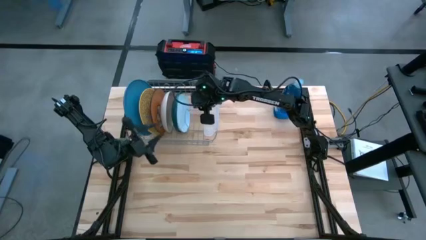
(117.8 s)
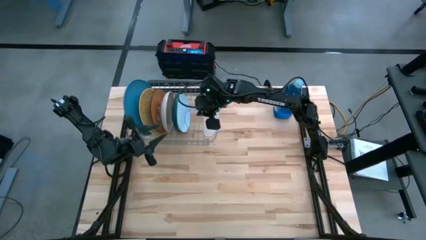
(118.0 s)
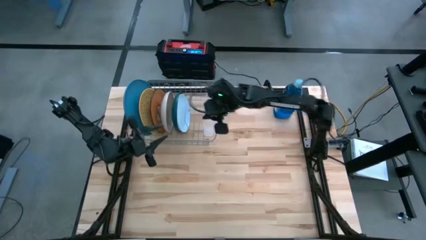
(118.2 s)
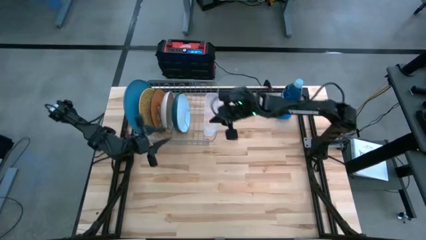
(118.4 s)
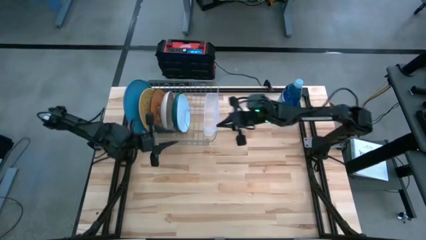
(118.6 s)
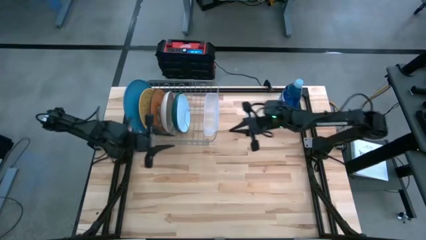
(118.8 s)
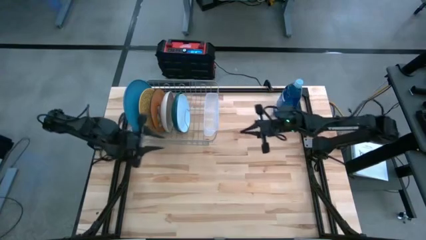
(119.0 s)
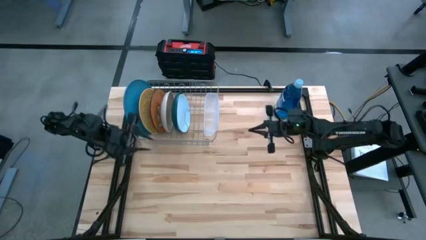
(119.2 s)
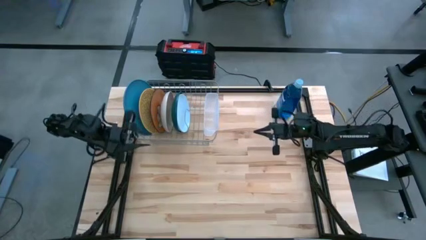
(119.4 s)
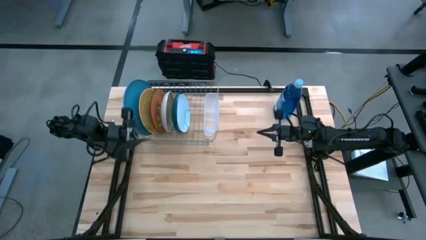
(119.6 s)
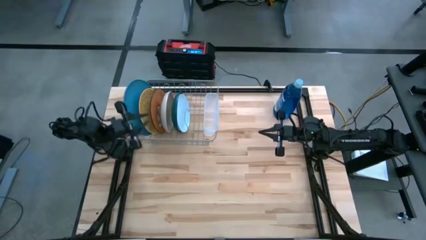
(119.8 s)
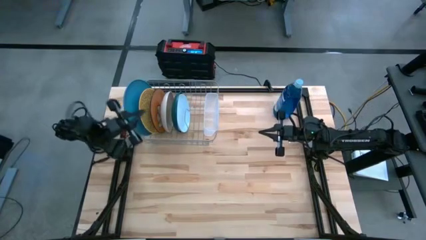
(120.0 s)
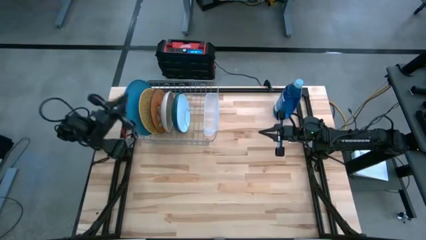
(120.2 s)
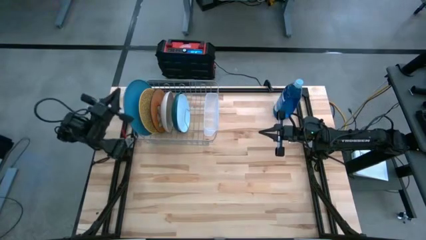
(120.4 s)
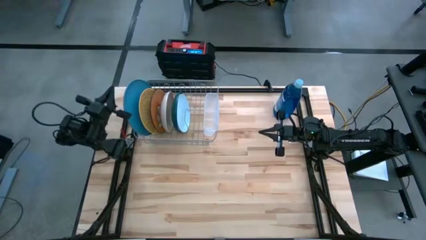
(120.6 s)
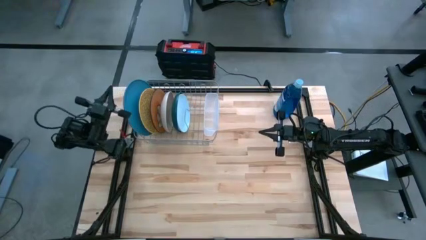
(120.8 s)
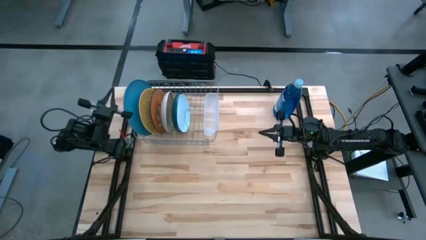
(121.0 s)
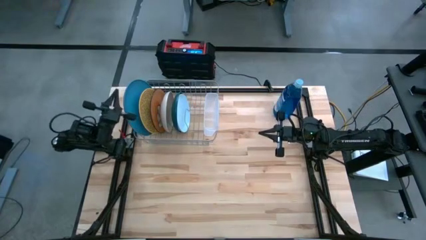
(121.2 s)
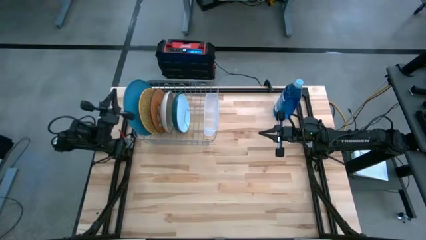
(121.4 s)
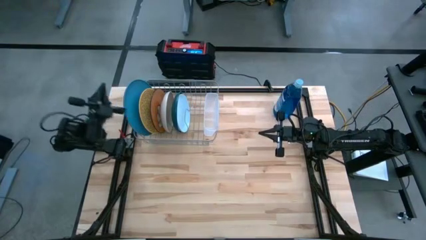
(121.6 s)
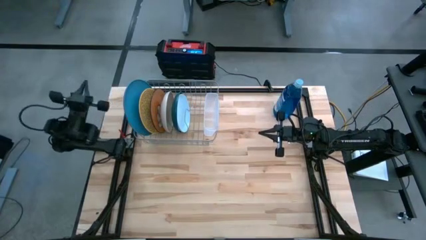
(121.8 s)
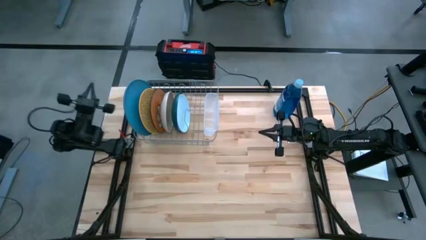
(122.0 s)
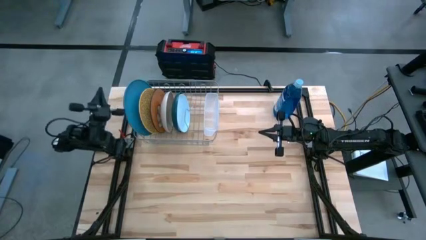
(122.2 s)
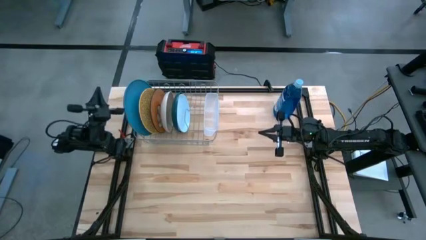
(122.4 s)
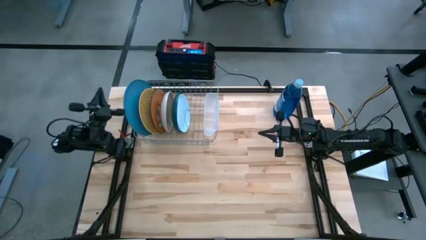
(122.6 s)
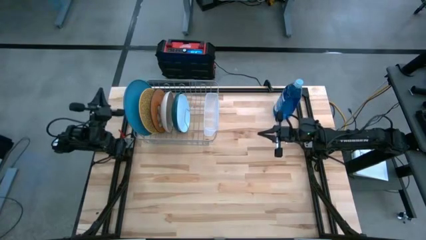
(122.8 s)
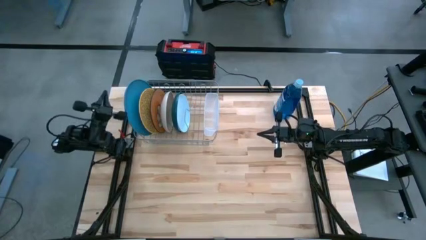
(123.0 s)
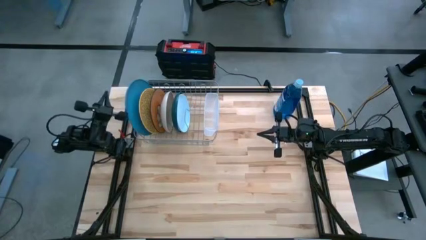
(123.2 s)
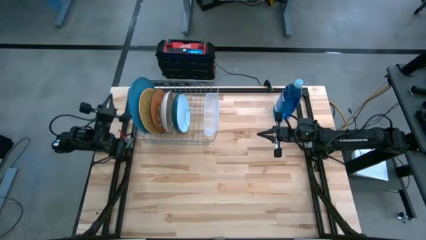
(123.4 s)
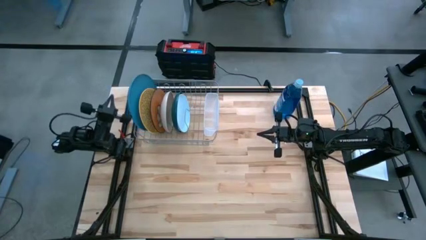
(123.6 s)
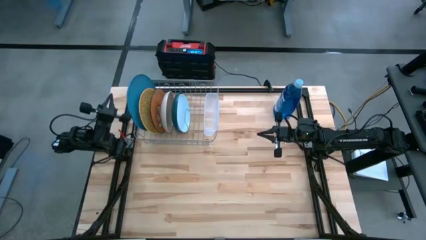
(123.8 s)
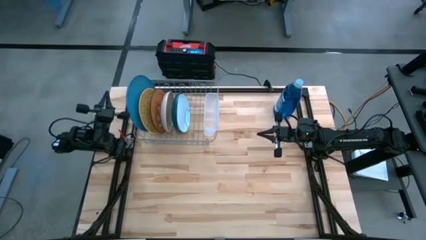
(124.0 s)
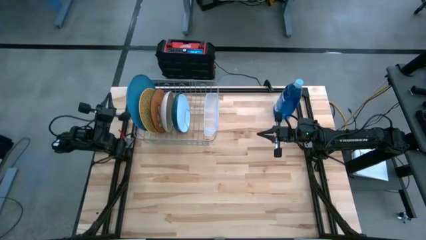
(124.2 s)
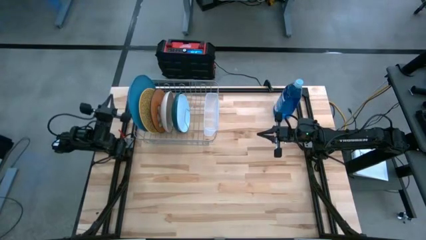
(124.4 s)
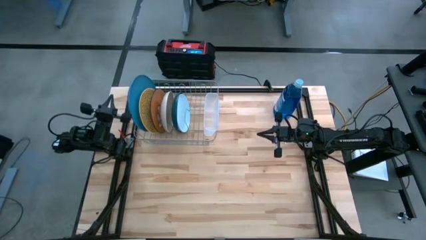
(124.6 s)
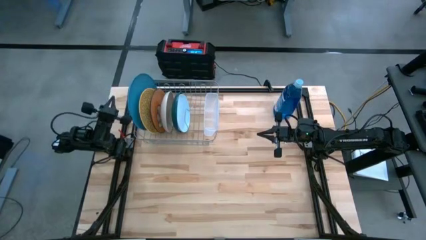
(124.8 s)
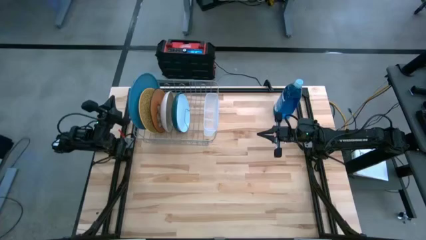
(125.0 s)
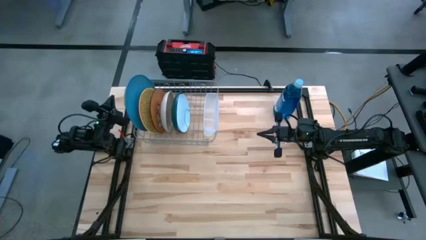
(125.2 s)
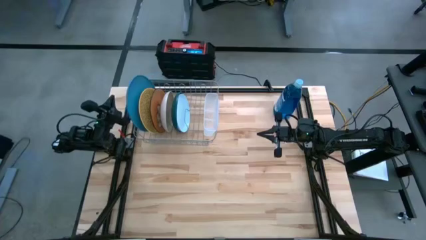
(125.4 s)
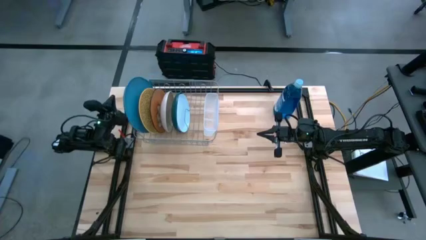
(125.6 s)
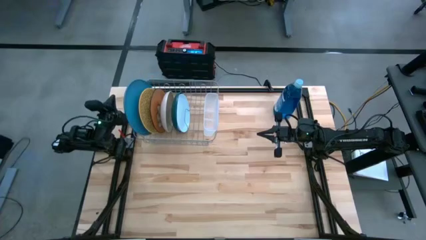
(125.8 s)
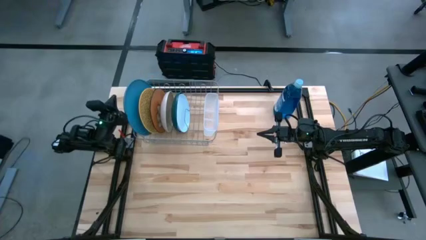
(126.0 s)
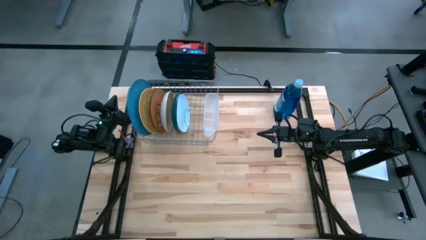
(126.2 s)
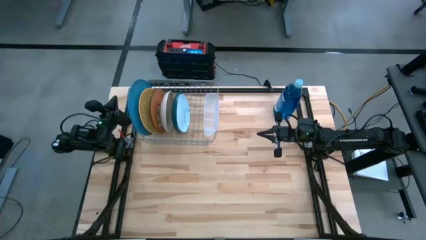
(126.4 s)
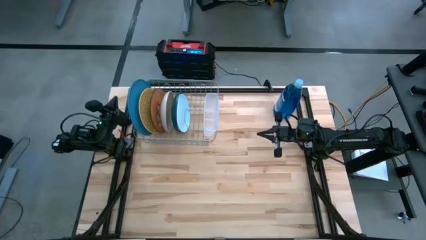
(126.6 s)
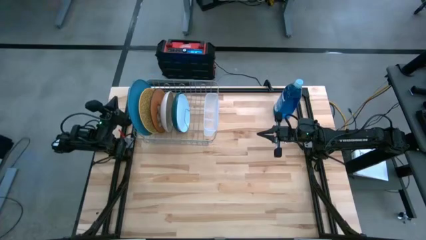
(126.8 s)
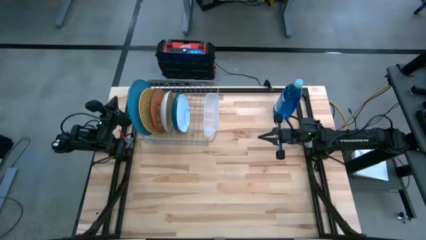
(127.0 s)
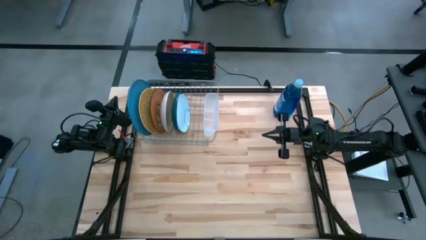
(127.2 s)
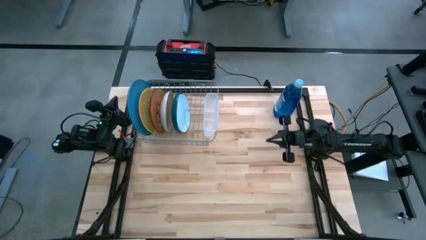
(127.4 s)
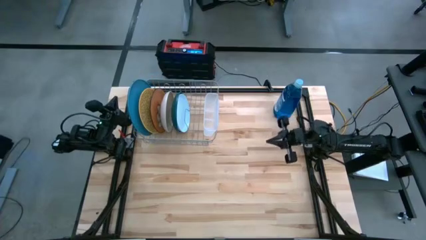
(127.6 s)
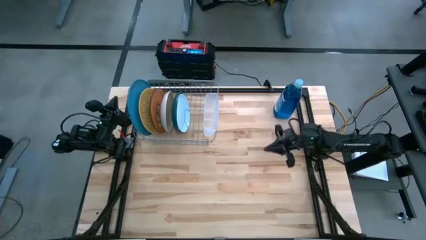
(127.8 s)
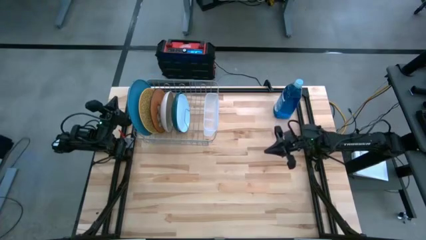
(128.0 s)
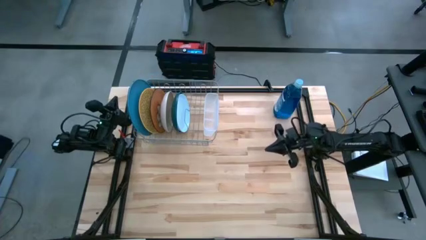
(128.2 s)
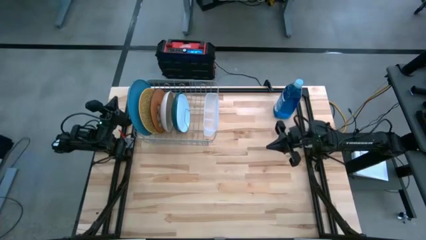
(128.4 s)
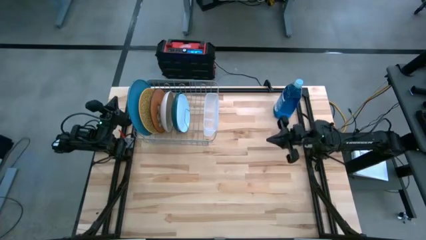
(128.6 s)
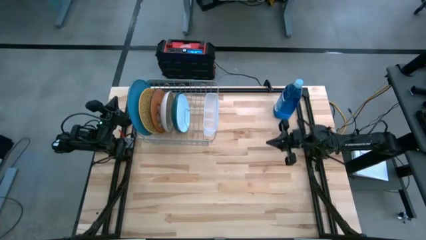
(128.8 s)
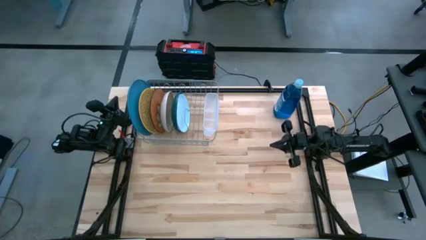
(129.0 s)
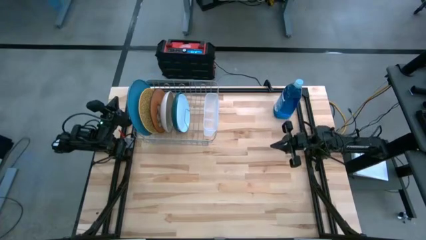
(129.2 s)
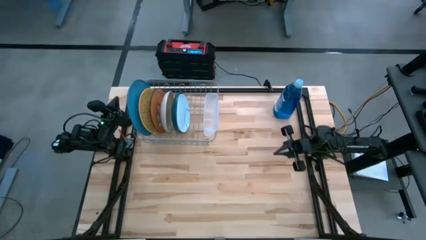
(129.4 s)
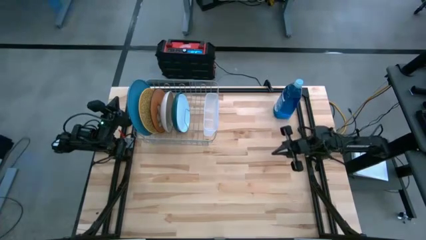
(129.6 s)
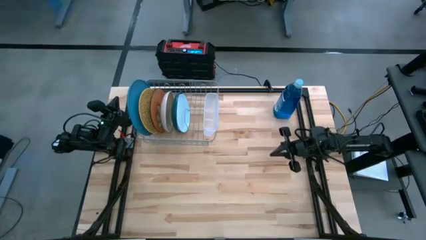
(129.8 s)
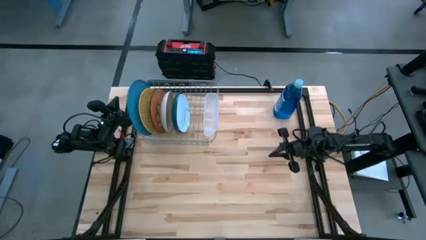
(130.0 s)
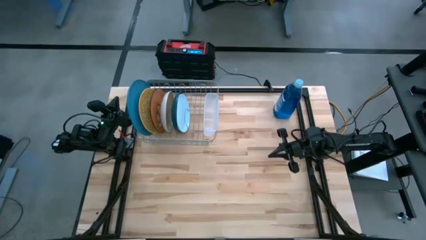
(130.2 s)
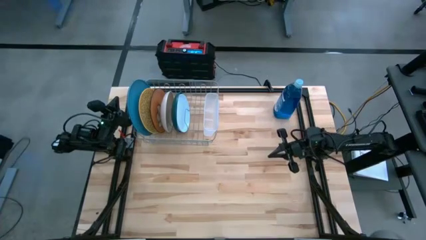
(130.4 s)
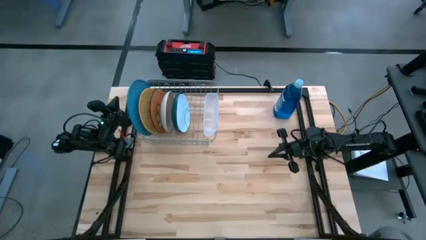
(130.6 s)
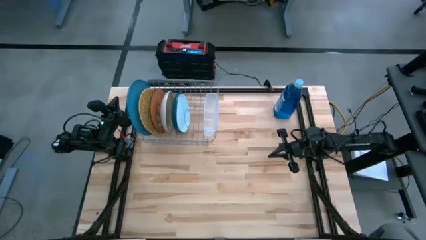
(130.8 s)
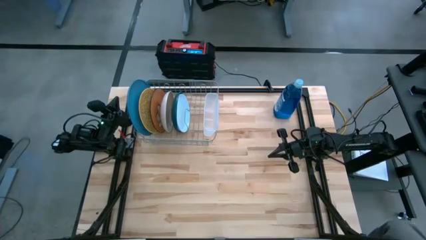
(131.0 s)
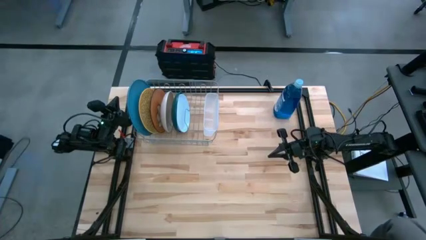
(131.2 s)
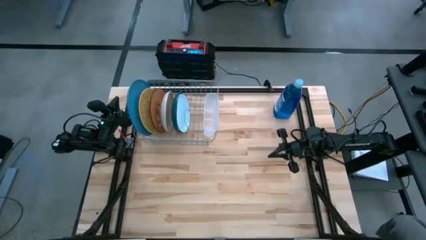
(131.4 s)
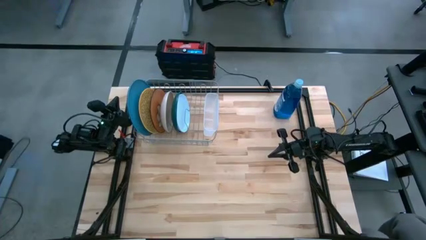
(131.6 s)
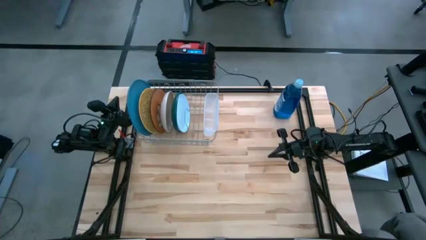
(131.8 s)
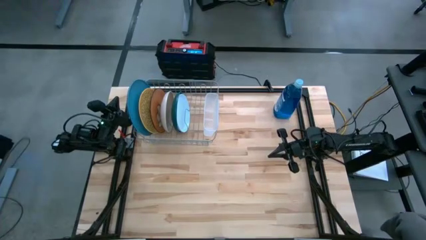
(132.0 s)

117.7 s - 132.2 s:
Task: Sort dishes
Return to Home Position
